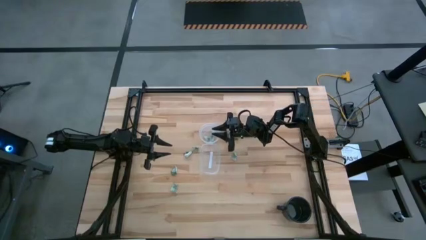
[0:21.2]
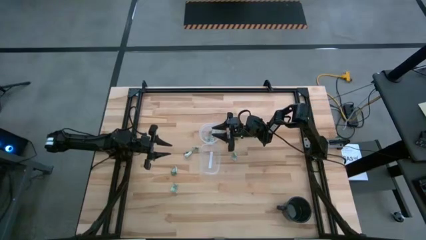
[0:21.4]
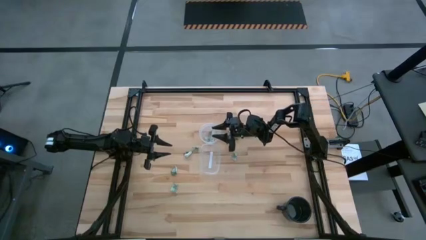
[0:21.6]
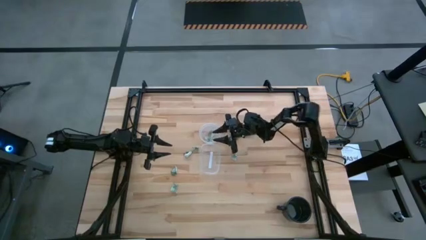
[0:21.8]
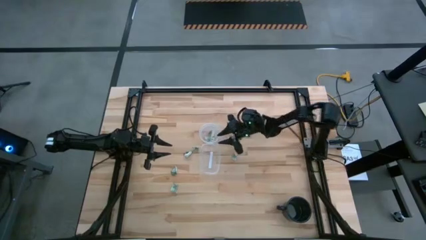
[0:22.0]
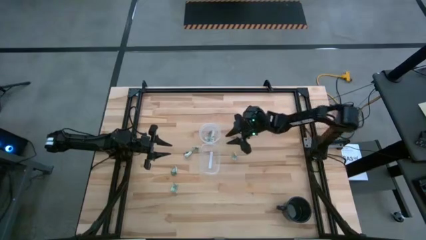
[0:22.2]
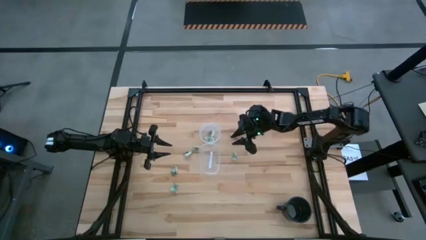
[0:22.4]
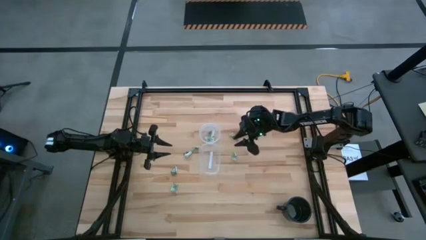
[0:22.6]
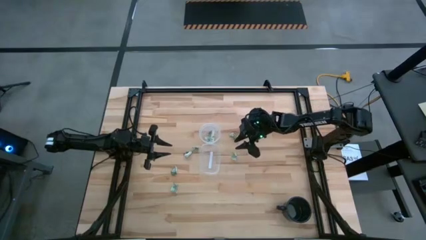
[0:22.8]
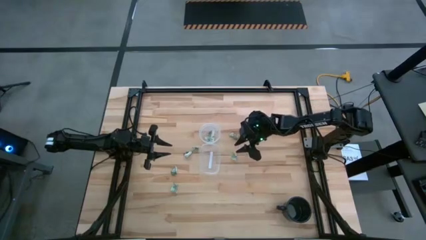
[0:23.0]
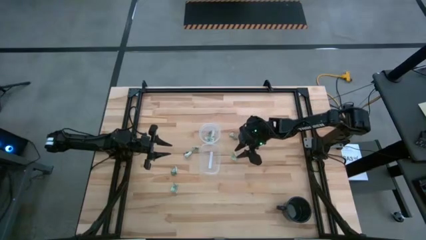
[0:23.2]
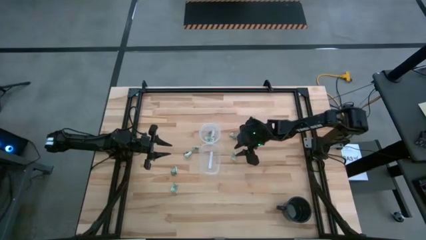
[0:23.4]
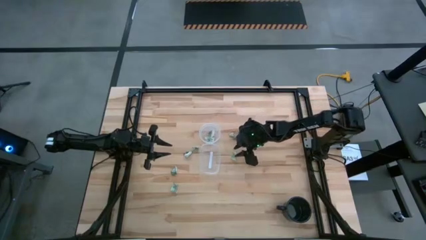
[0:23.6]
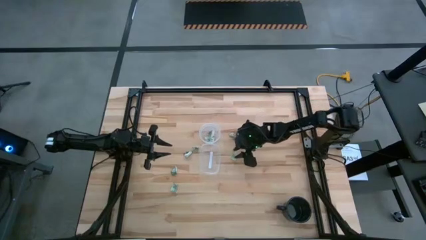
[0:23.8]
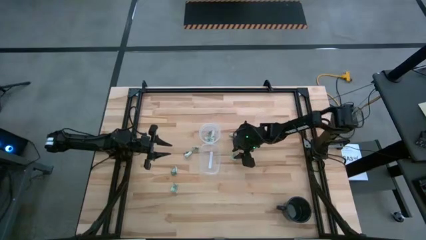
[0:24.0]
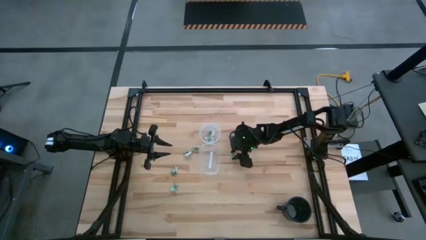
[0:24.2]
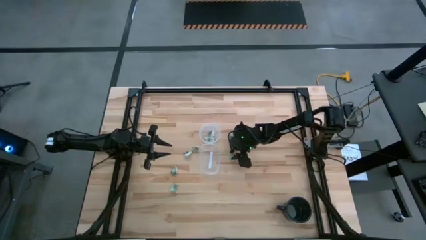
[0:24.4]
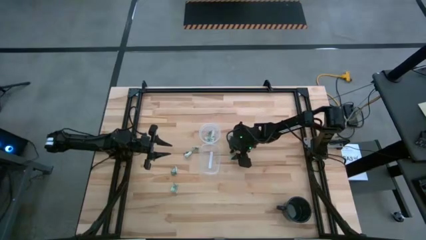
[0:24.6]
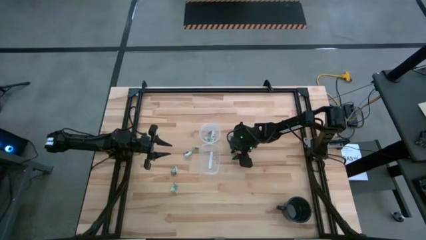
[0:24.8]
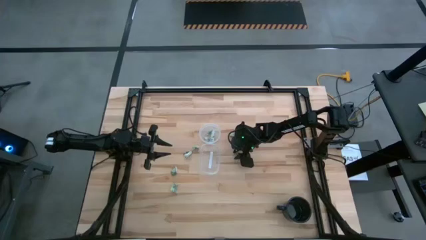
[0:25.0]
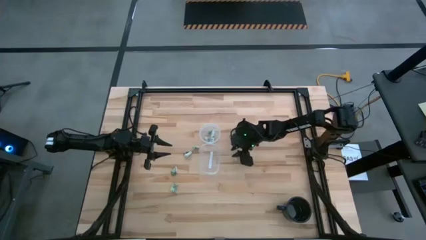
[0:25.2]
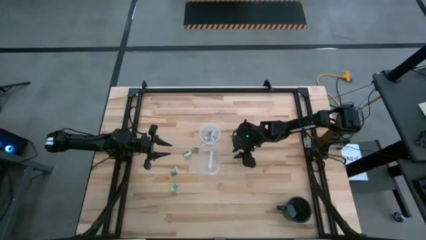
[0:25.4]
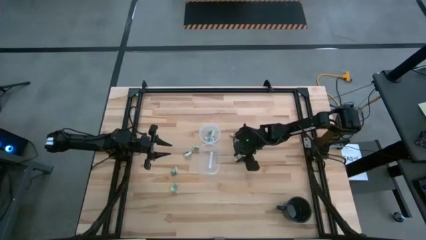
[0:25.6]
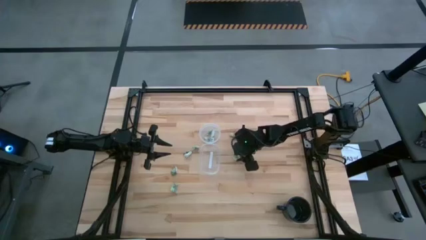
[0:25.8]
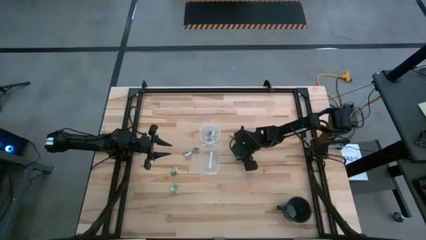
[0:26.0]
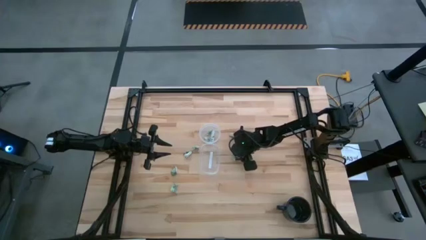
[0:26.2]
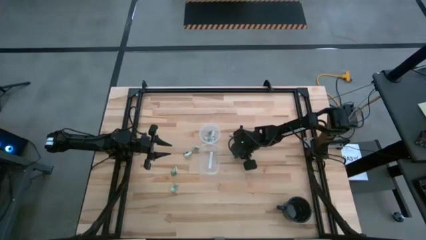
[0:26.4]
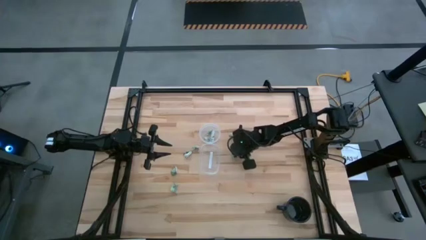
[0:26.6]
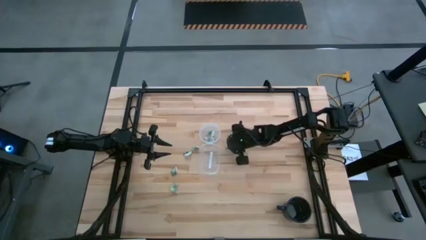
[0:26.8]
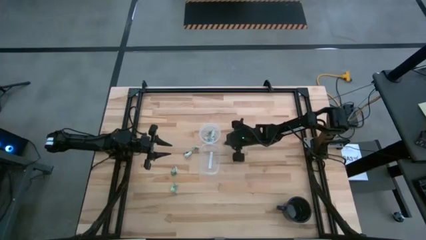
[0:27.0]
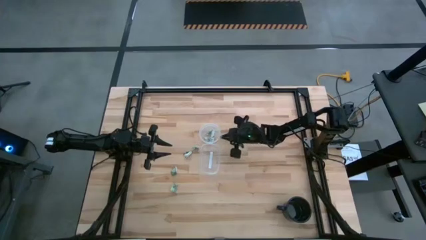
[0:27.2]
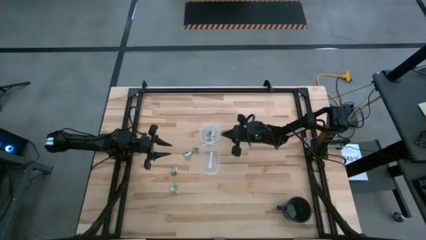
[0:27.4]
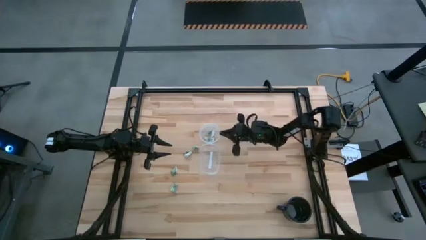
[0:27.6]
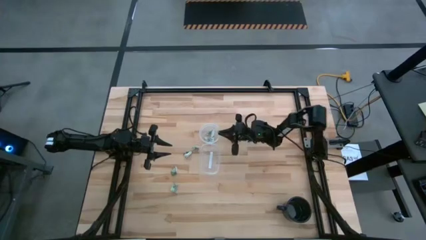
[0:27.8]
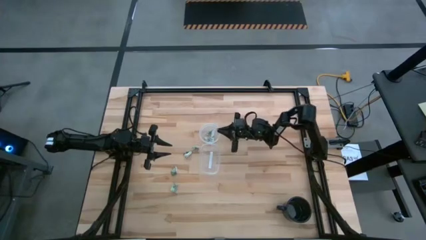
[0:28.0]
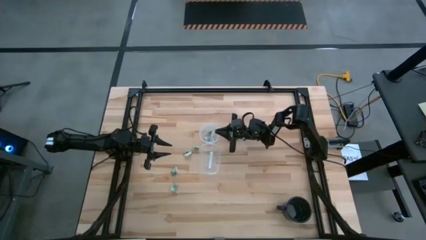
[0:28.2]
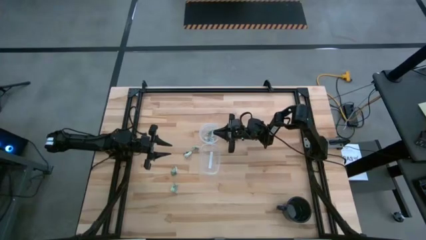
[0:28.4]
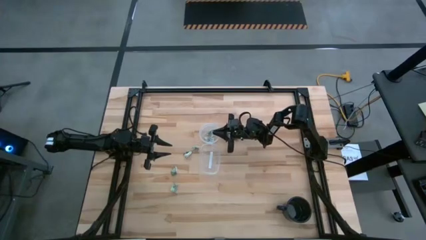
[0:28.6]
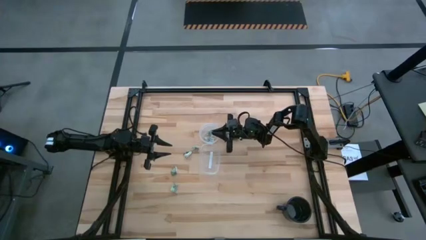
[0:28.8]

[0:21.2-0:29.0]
Task: Pick and place items into bin
Put the stevia packet into the circular transparent bin

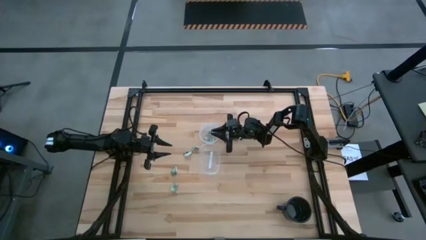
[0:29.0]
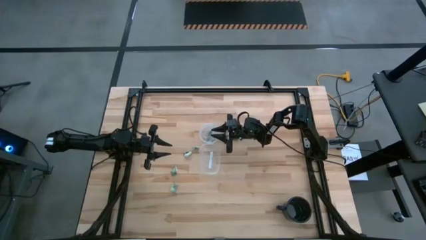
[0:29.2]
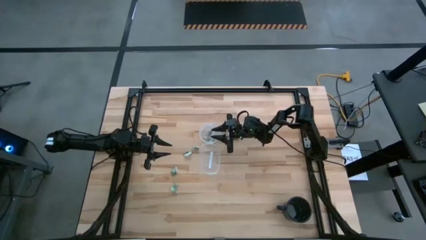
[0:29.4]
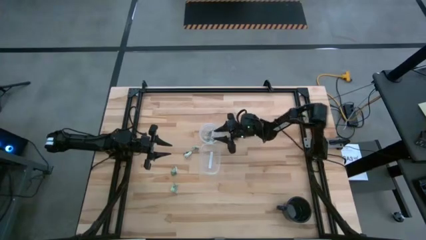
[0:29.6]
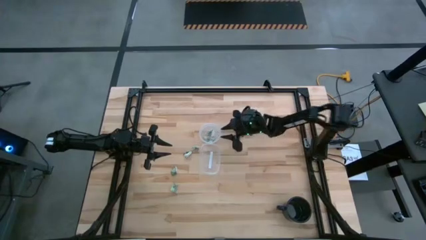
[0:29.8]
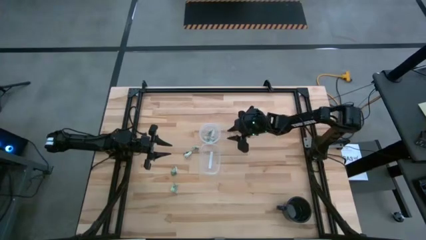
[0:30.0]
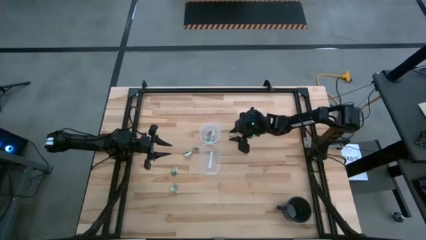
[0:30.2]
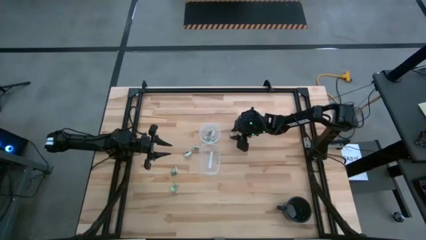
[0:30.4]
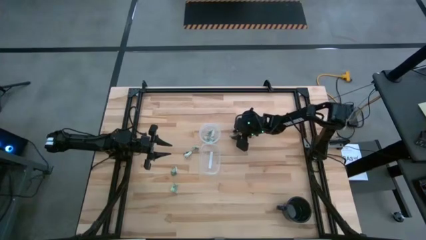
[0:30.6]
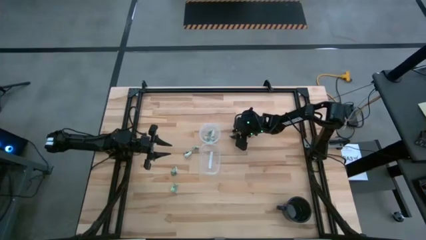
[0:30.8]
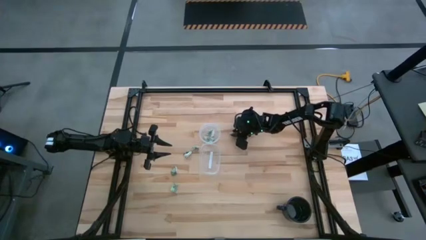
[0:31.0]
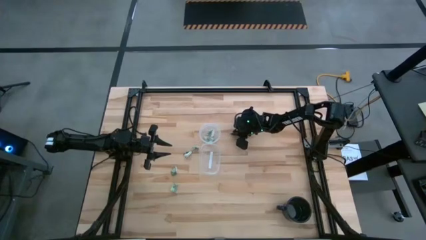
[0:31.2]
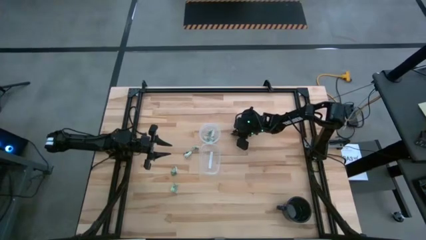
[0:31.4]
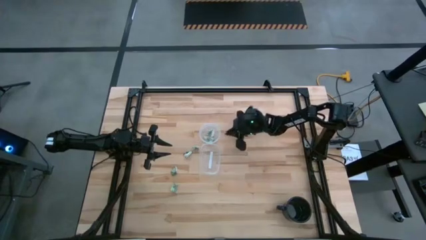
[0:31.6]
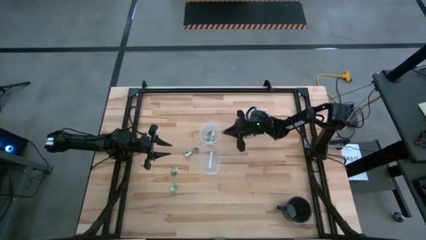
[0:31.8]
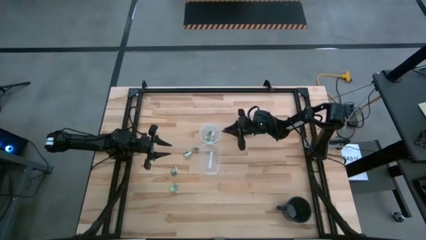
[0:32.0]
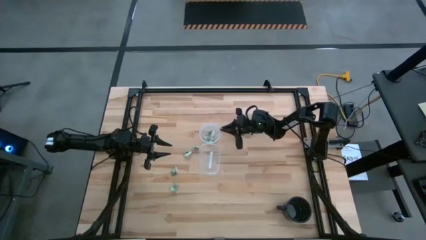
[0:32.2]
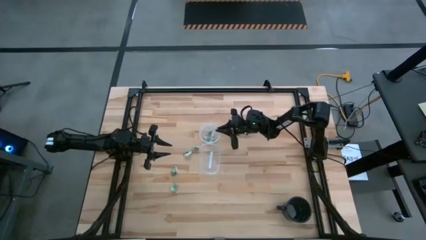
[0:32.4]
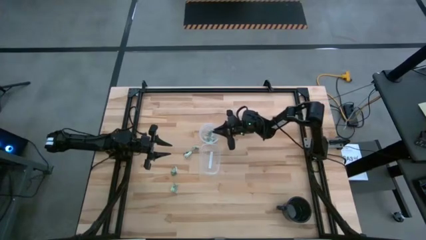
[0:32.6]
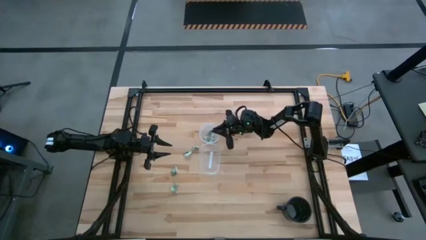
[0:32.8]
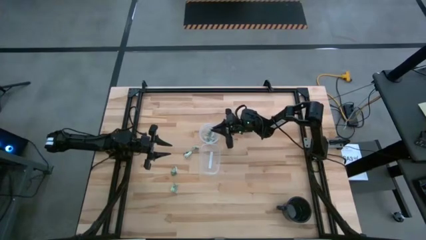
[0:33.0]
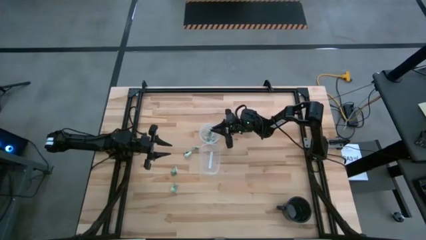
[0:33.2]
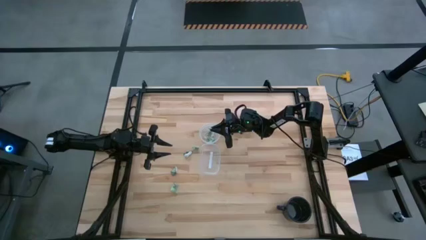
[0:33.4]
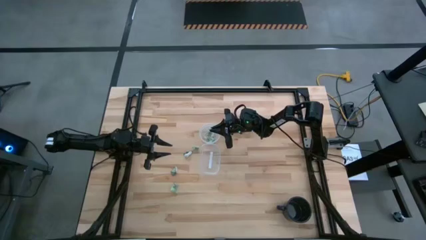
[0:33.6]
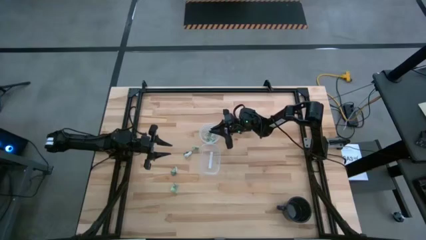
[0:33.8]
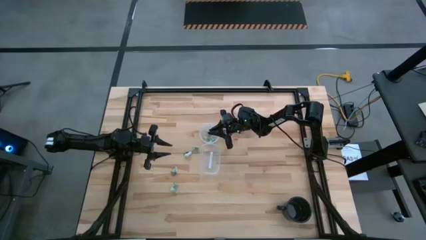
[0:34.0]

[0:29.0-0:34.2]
Put the stevia packet into the circular transparent bin
